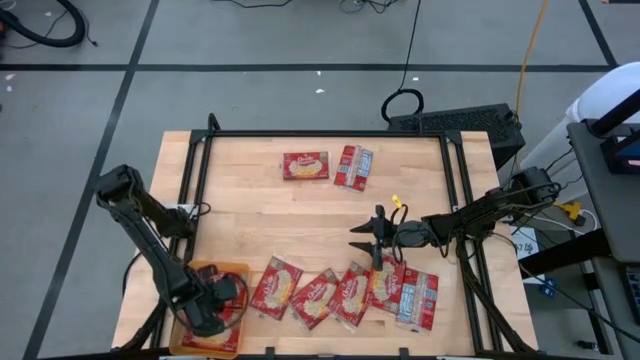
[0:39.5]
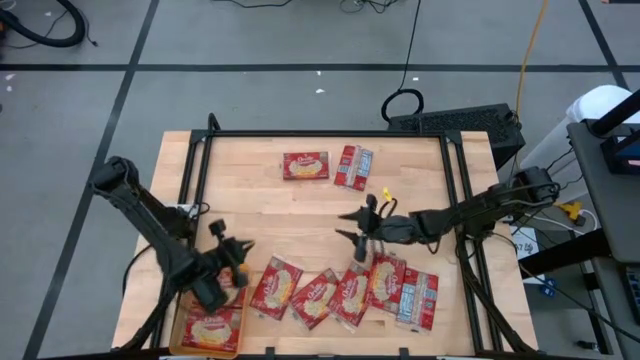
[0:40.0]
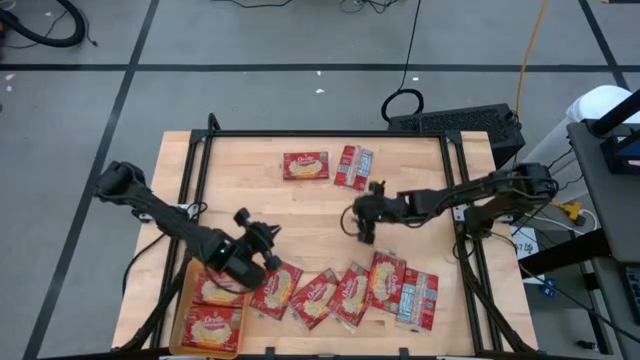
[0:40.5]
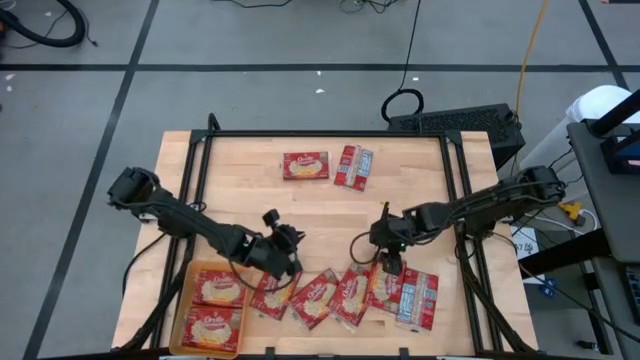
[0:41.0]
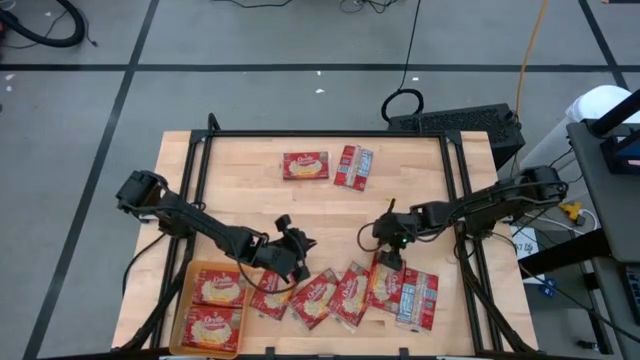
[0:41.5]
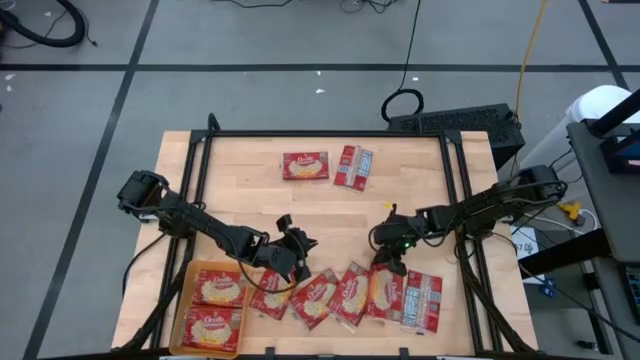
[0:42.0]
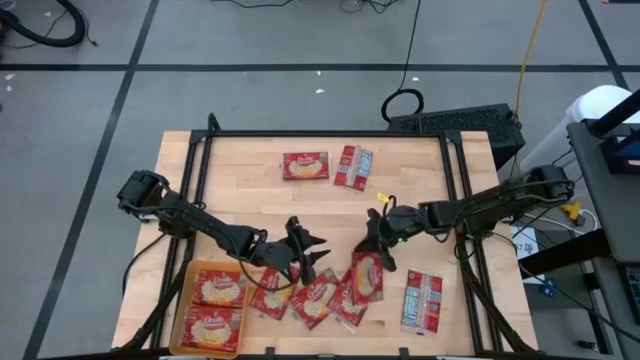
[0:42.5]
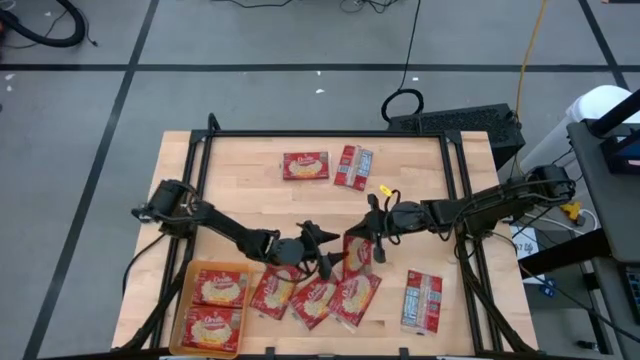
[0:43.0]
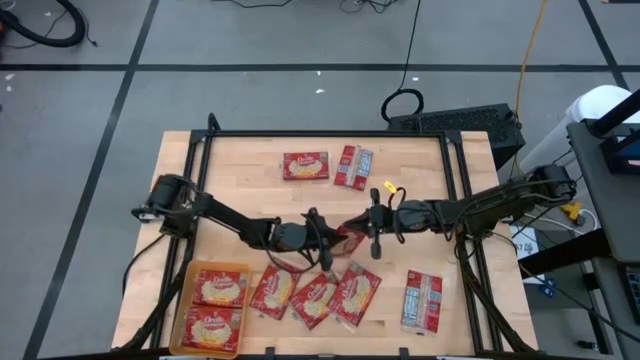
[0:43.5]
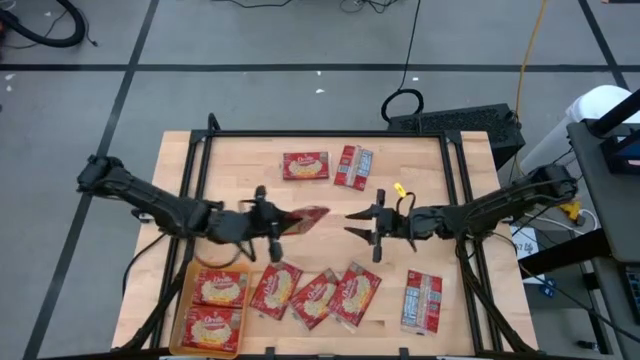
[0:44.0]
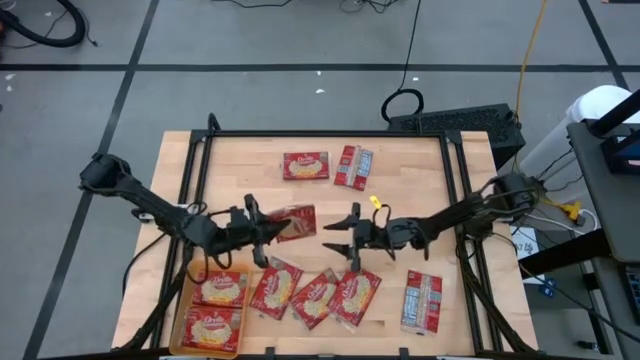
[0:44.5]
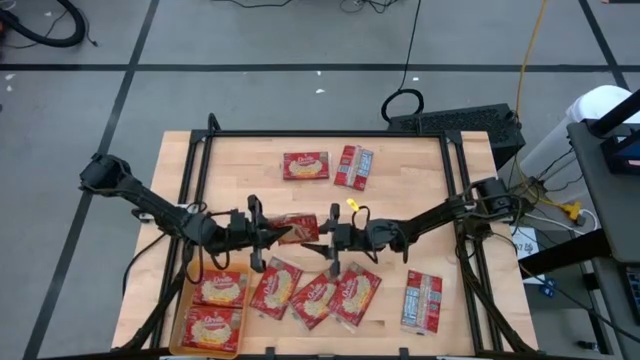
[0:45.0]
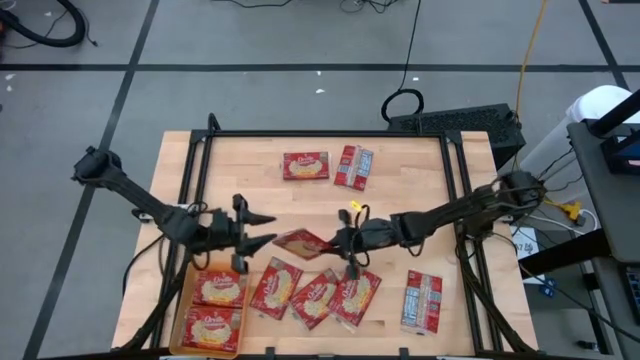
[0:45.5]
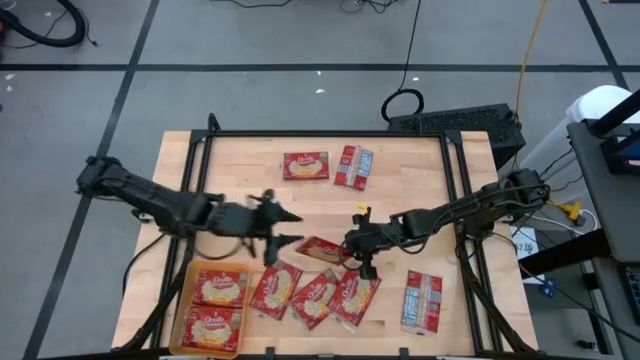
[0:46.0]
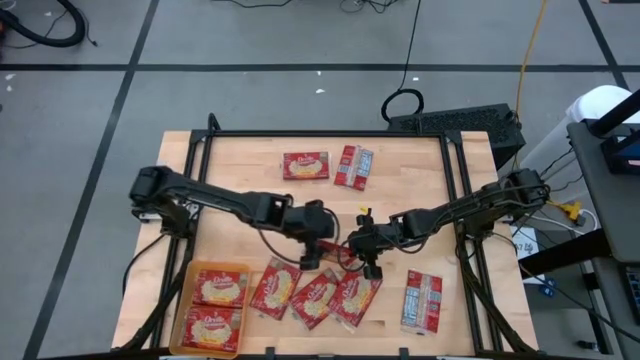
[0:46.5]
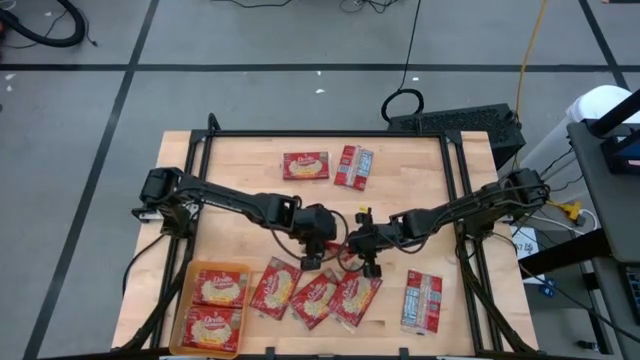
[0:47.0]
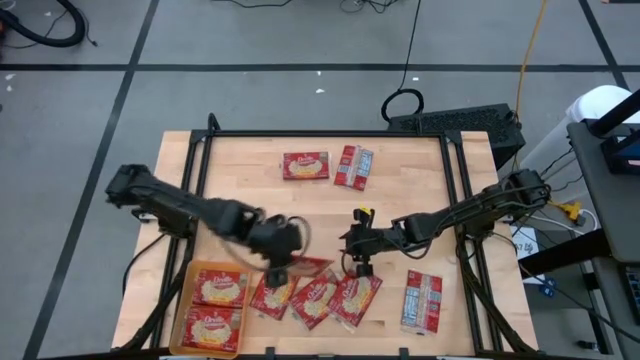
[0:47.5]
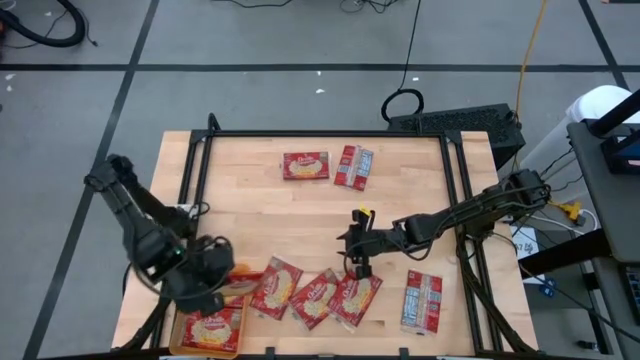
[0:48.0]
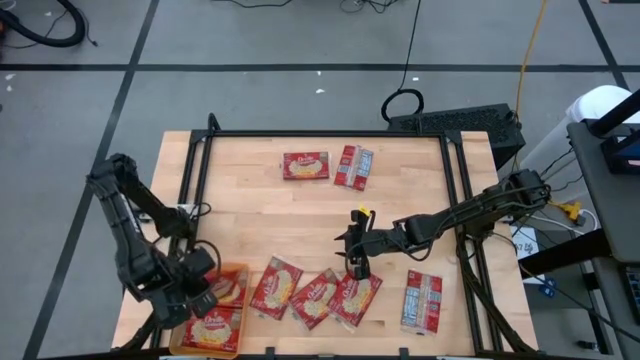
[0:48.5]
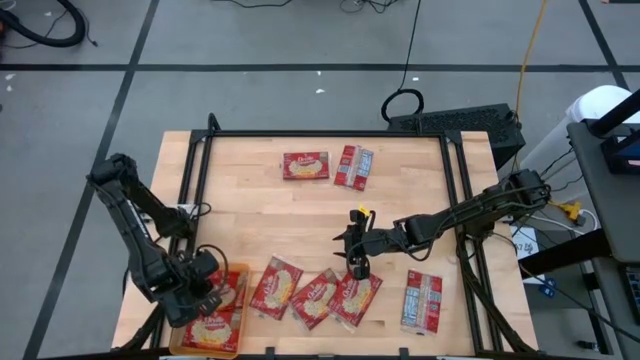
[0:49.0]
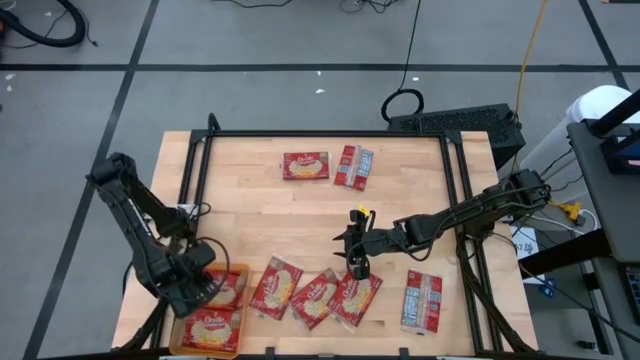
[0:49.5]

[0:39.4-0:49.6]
Task: Sort popcorn bags into baskets
Put the red popcorn bag into the orange bin

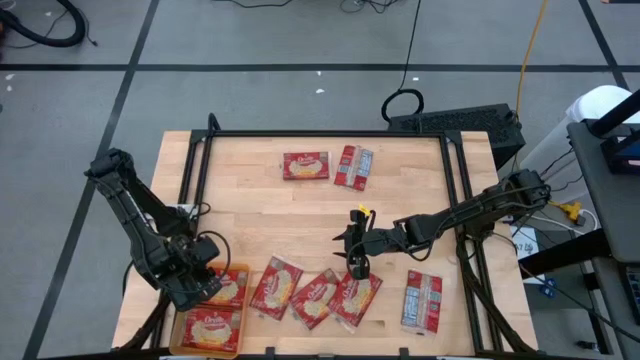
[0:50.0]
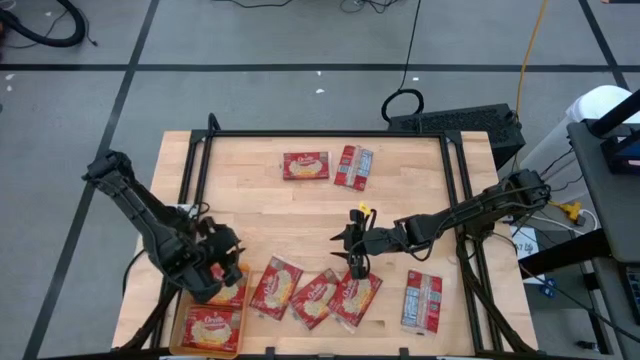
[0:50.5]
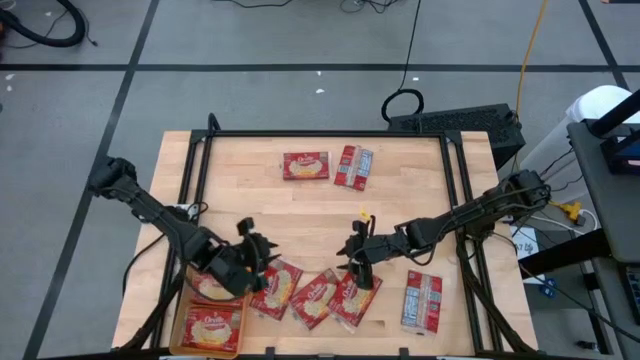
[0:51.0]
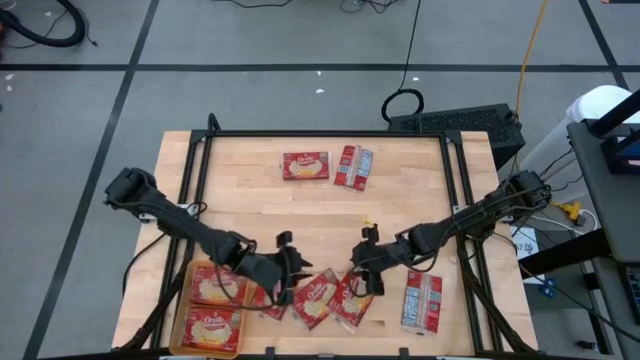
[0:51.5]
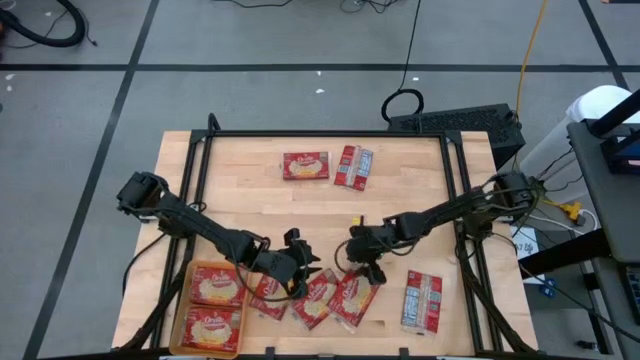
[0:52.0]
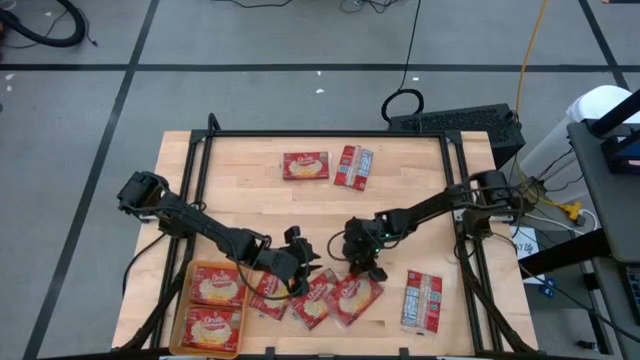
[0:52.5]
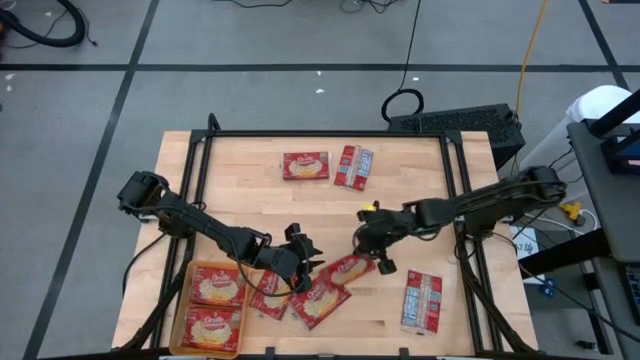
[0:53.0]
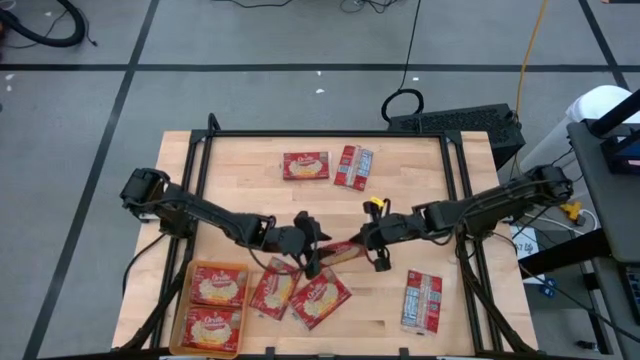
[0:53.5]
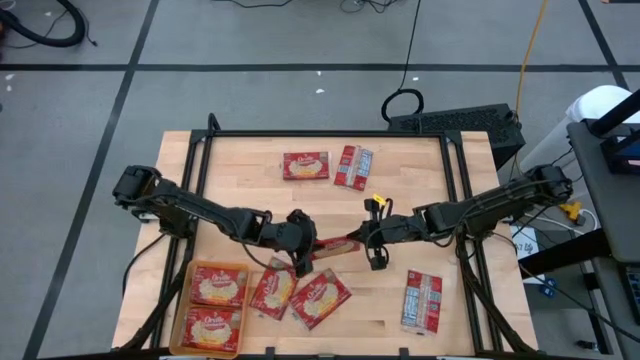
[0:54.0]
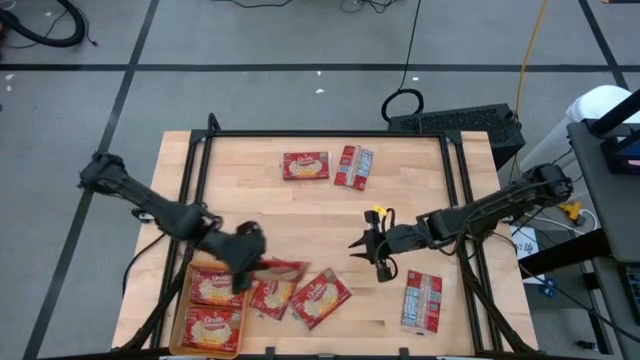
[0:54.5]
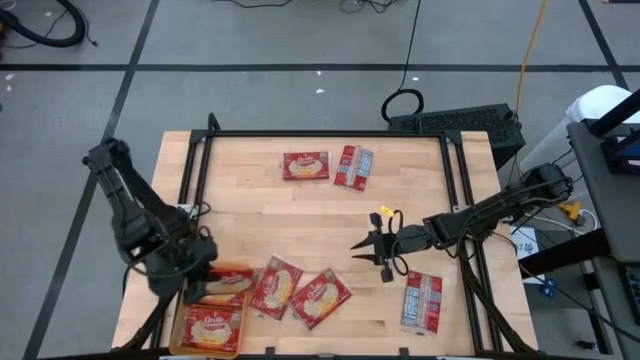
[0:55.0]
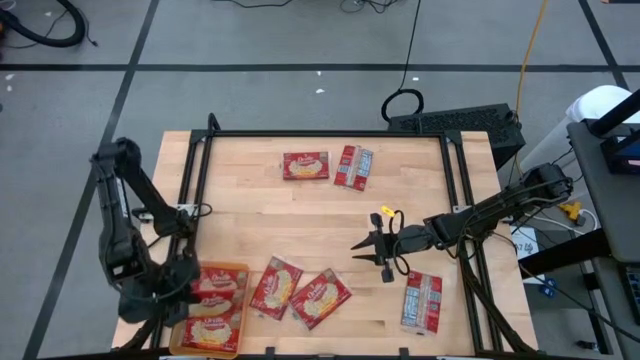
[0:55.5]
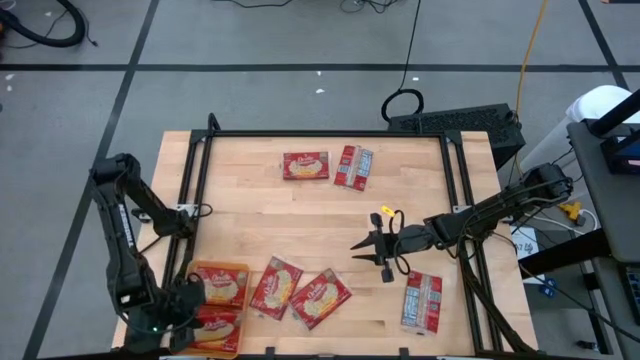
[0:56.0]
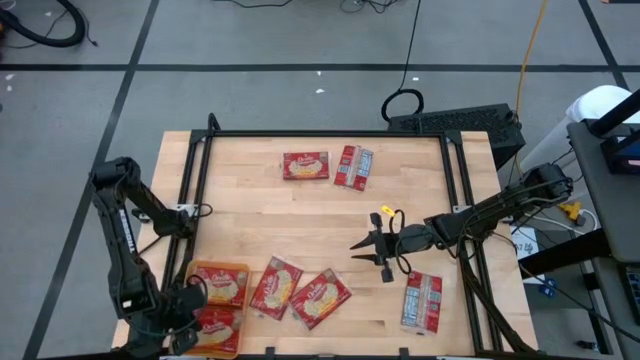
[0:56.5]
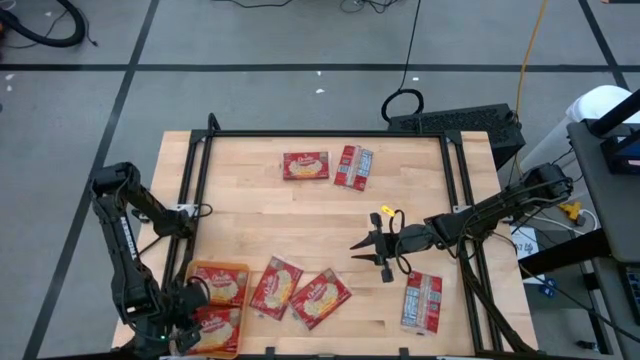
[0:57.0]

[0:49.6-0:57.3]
Put the red popcorn bag into the orange bin

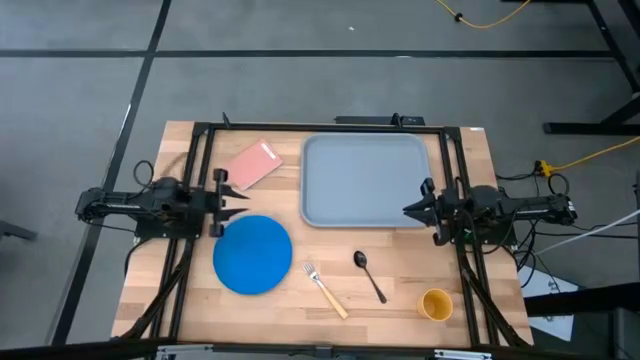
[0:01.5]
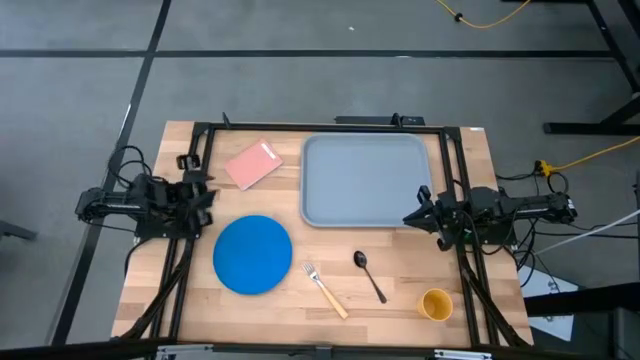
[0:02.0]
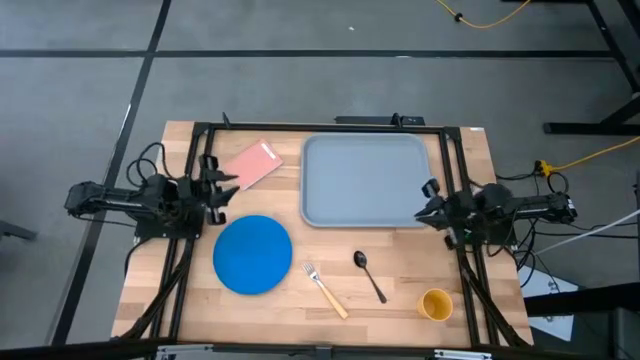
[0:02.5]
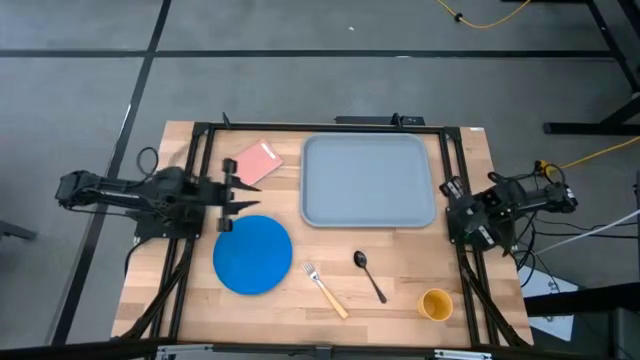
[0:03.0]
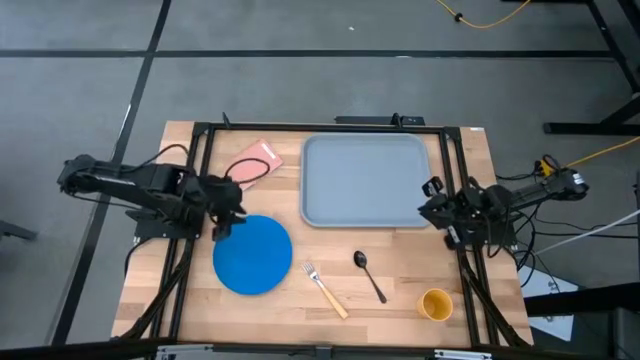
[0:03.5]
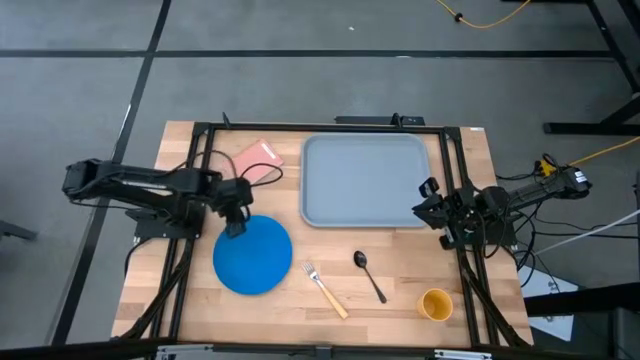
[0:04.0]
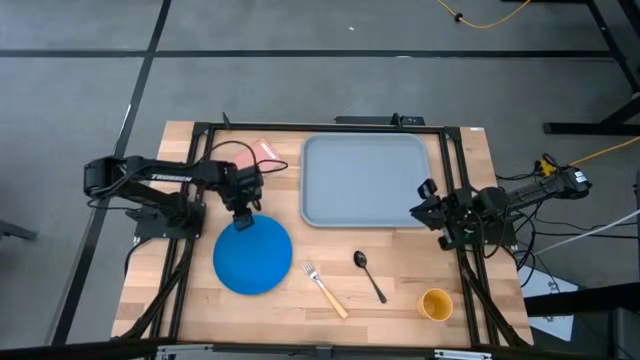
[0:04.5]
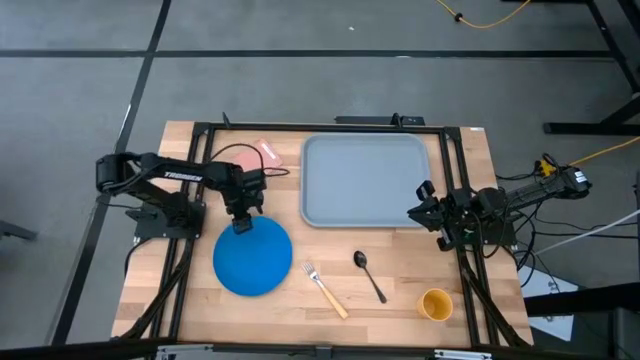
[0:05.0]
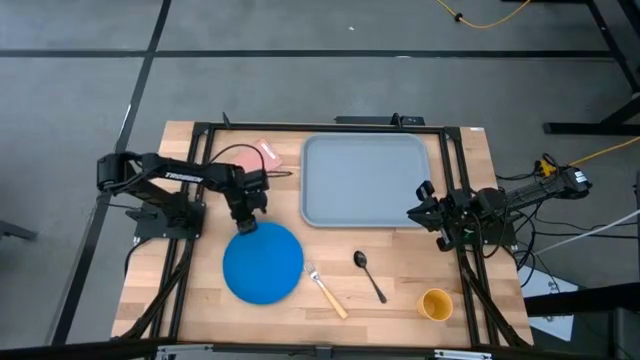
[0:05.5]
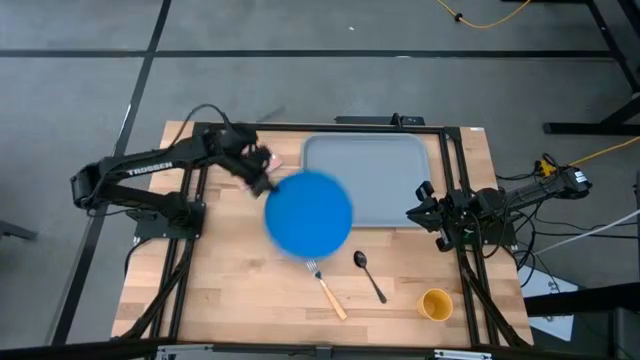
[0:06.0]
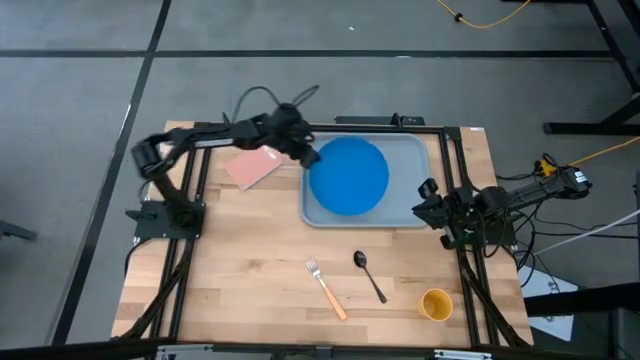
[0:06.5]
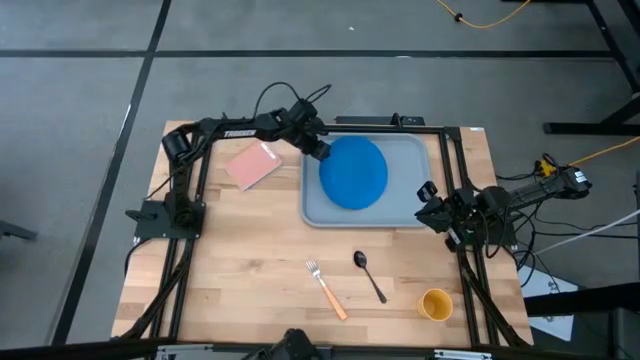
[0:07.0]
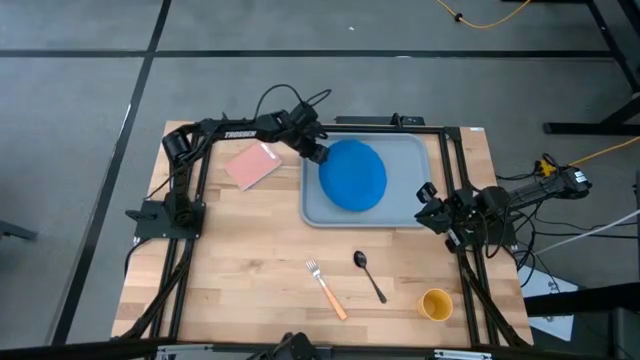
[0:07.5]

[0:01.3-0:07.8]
Task: Pick and place plate/cup/fork/spoon on tray
Put the plate on the gray tray
